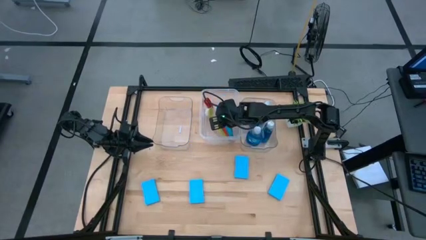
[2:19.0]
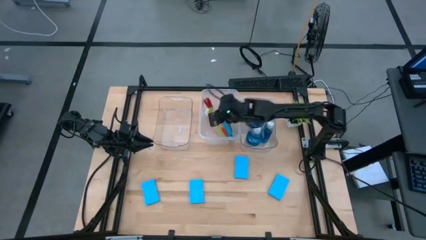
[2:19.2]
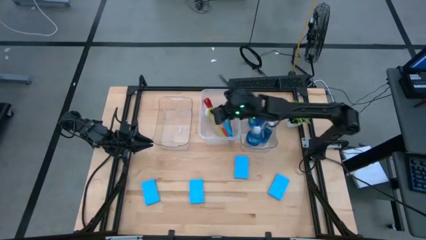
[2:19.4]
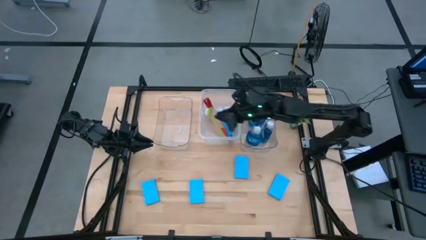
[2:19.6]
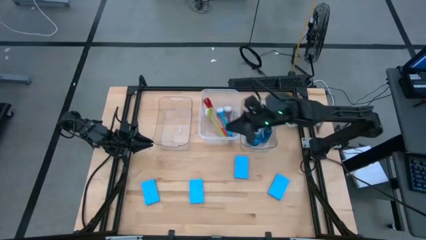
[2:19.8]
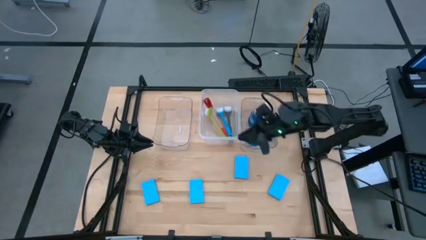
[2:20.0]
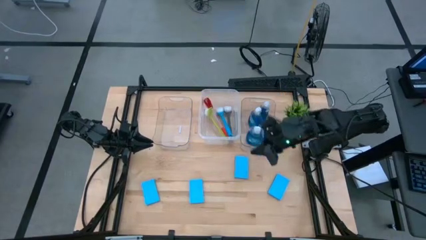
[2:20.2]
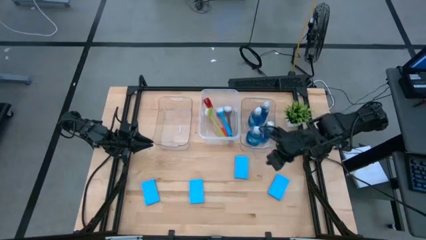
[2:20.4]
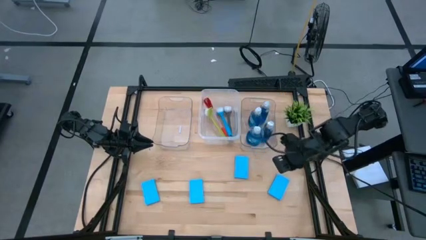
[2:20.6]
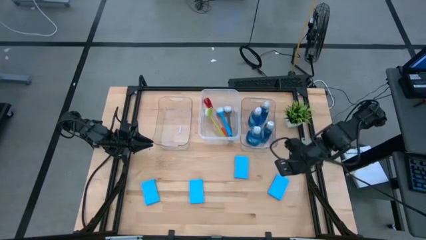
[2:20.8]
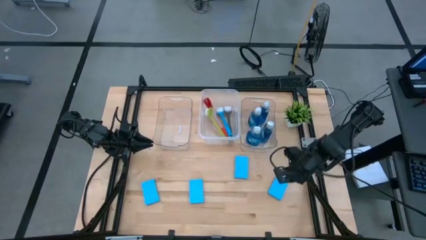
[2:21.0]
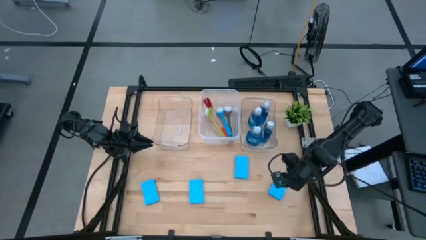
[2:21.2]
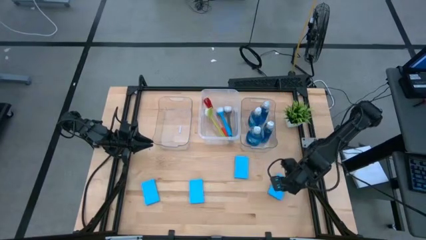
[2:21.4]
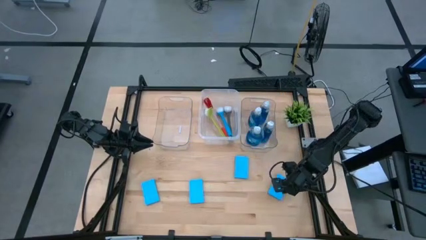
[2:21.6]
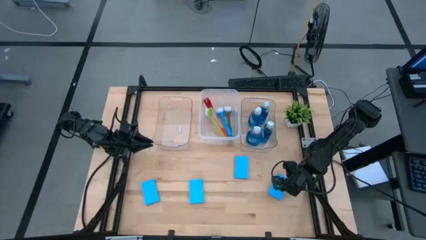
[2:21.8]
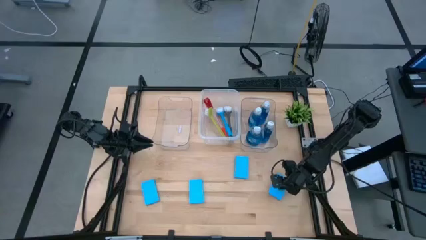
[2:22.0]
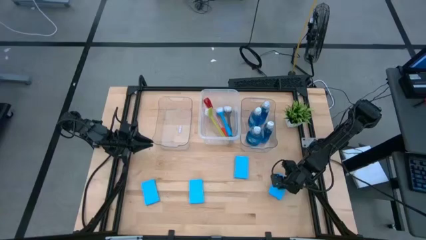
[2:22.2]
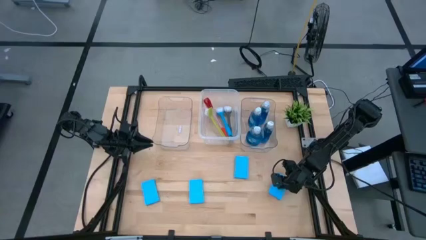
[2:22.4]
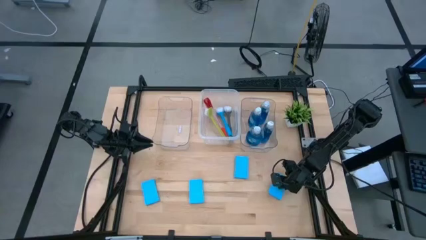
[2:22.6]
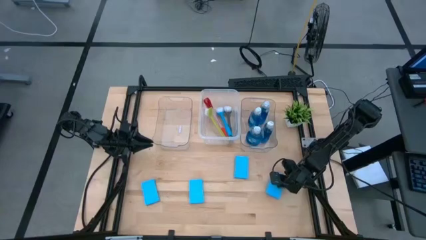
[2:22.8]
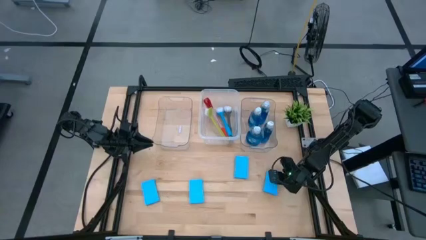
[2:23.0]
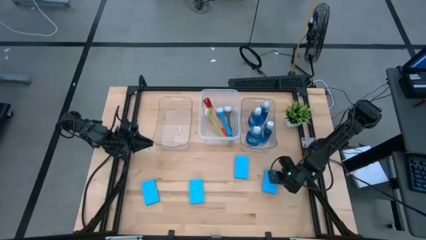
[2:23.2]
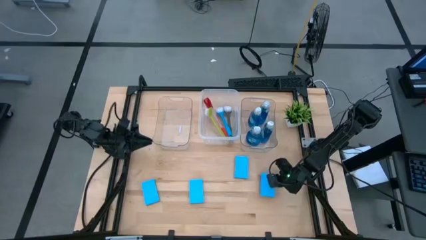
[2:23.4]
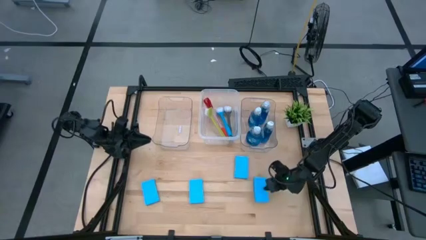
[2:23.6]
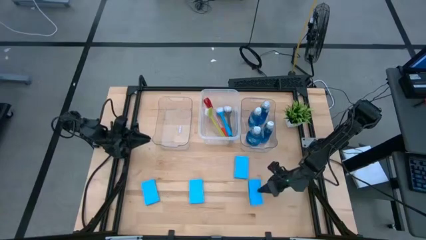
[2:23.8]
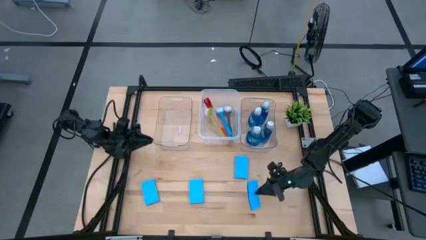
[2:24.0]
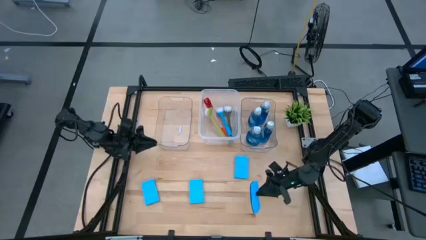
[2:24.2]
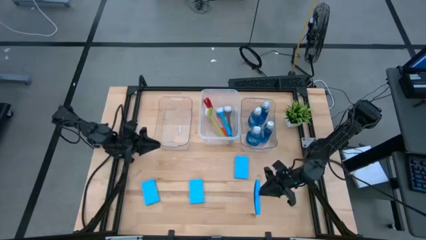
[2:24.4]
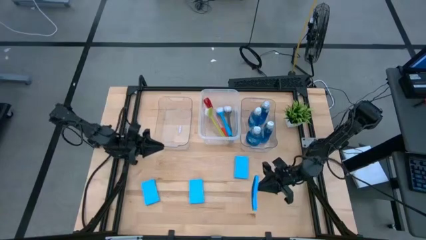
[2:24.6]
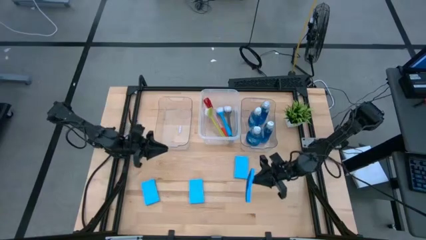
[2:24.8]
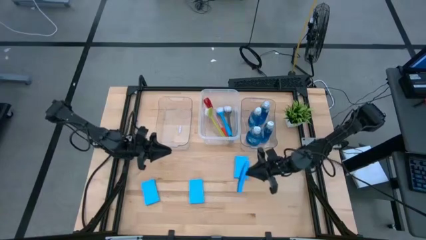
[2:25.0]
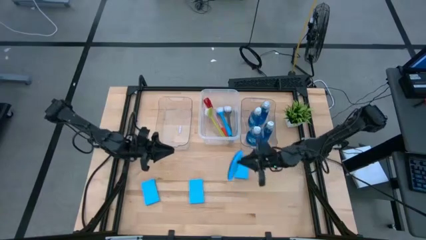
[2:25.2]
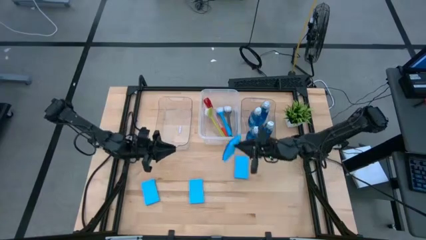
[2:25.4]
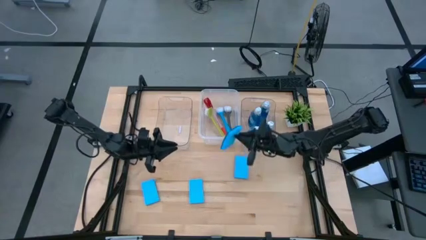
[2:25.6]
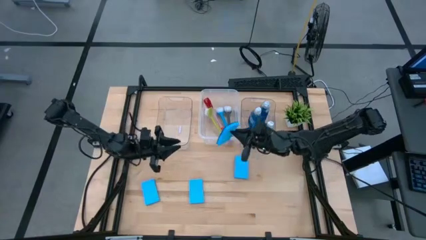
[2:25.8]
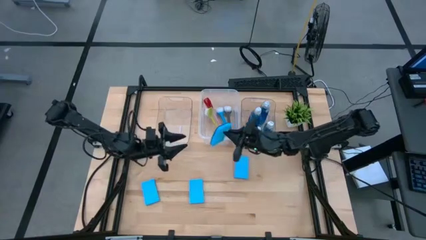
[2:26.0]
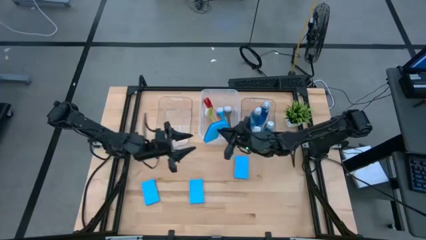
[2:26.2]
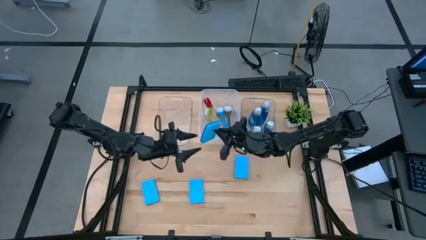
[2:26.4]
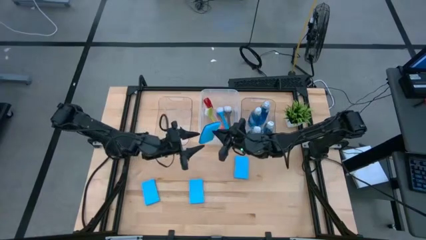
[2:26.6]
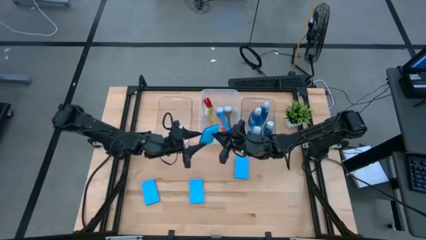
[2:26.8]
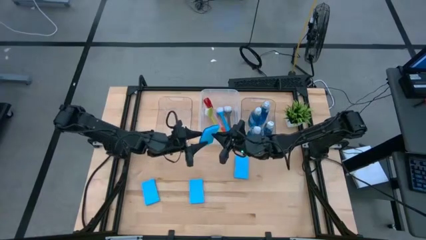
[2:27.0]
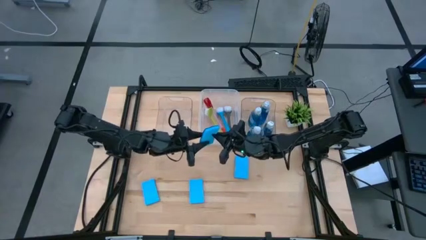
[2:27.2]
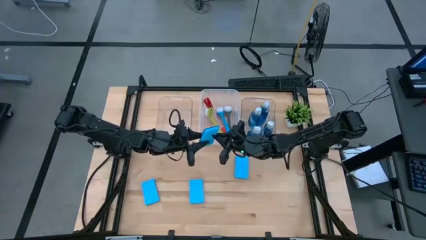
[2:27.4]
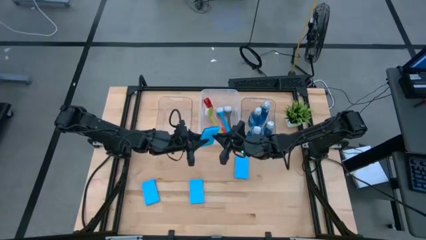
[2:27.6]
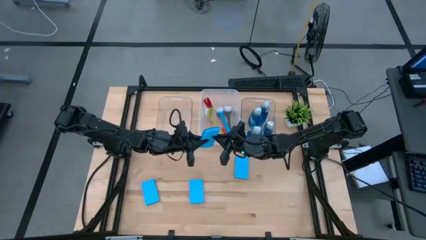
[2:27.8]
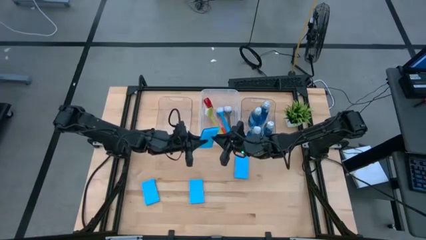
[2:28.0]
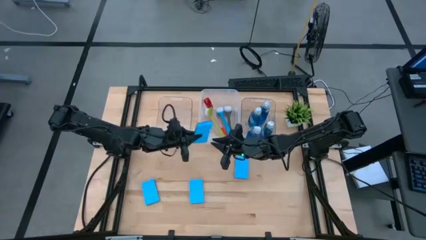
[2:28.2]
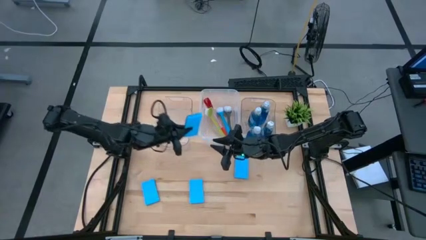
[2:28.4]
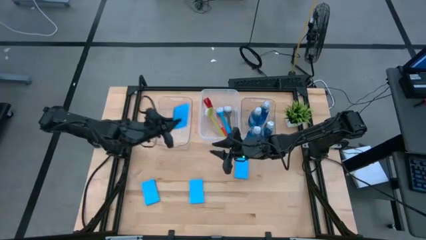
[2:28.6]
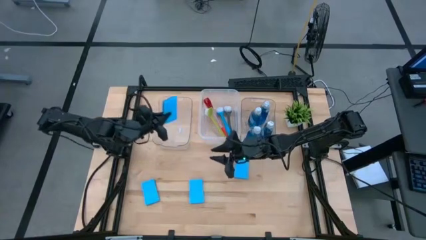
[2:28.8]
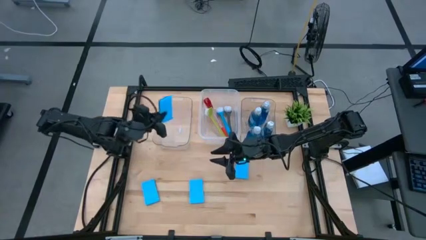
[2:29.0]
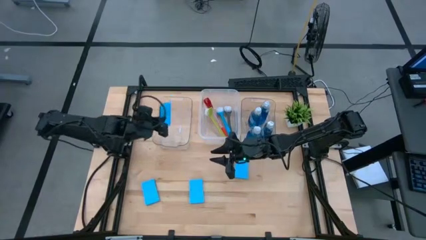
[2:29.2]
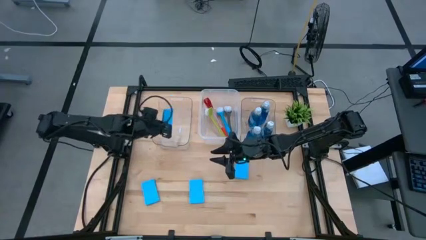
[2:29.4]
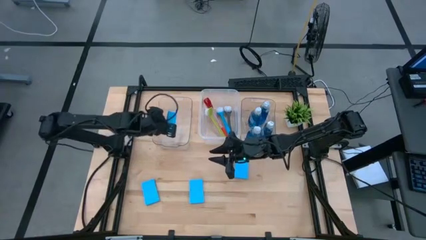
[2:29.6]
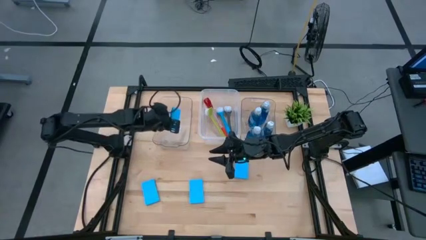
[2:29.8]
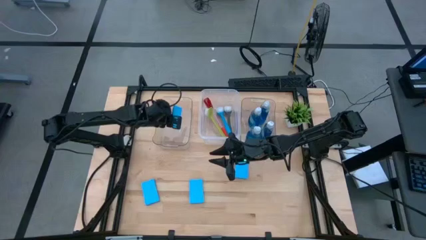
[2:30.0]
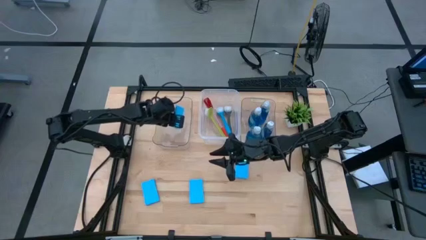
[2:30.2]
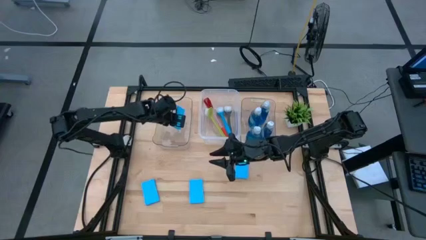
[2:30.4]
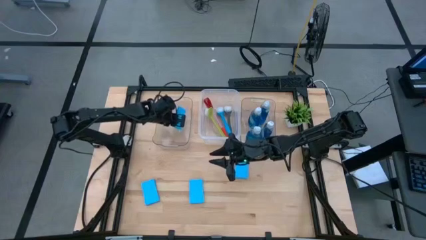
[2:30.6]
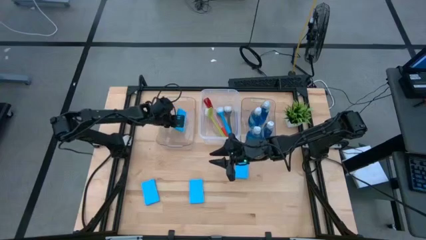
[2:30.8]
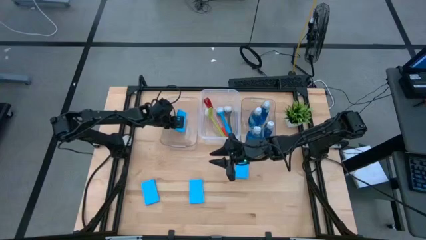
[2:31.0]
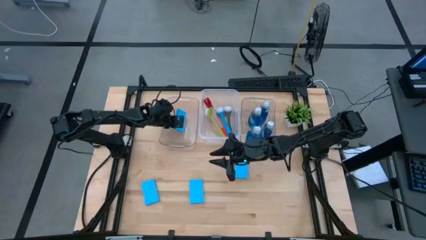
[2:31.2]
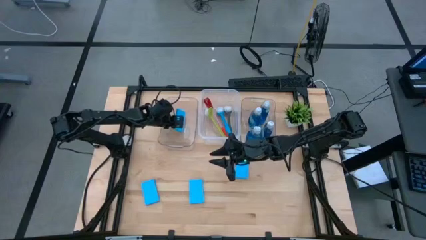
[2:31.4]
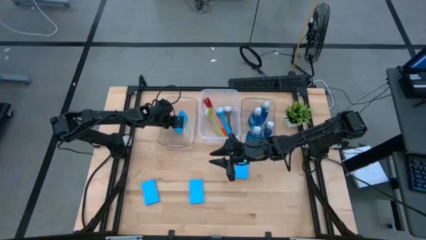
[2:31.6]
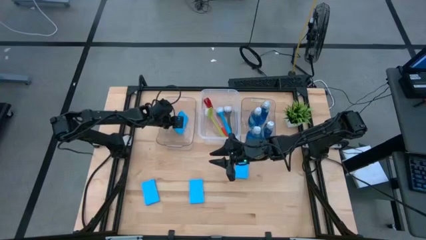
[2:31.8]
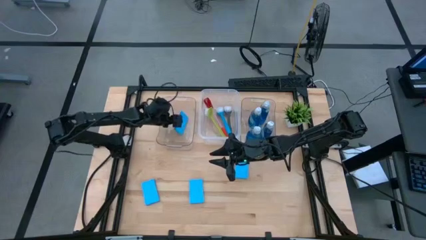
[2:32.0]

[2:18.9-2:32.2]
Task: Pick & Place Kitchen Sink Supplies
Put the blue sponge into the left transparent bin
